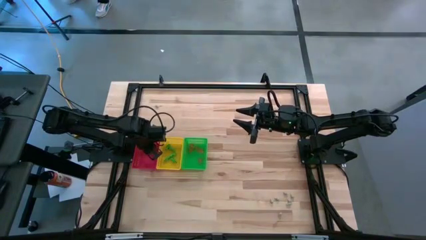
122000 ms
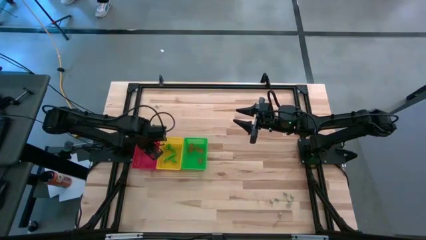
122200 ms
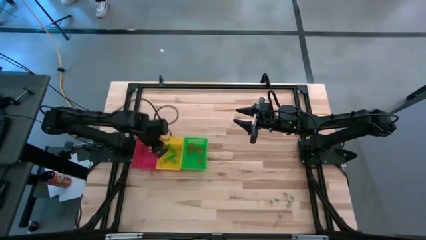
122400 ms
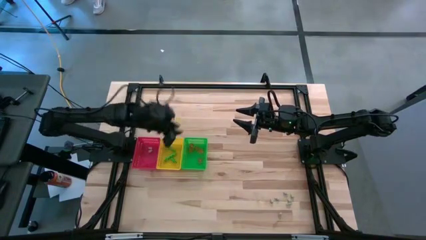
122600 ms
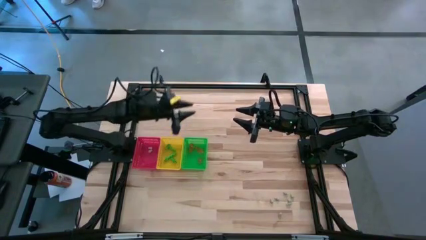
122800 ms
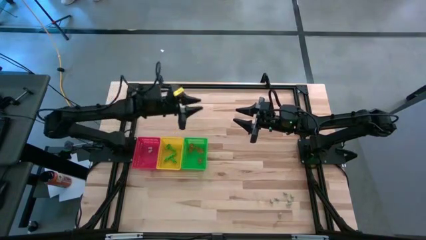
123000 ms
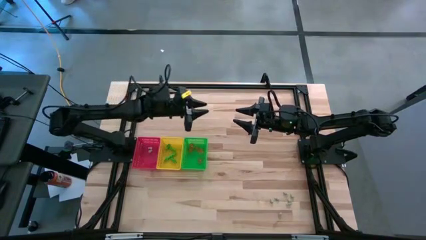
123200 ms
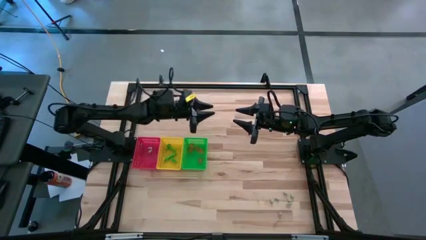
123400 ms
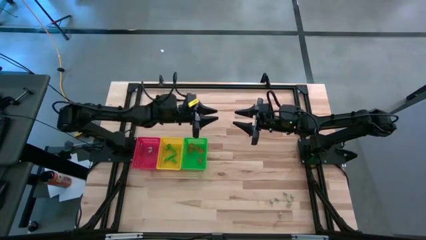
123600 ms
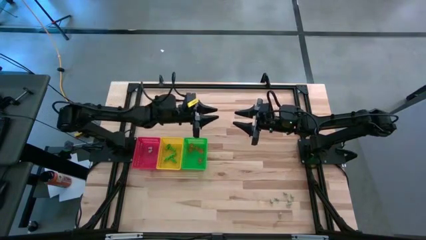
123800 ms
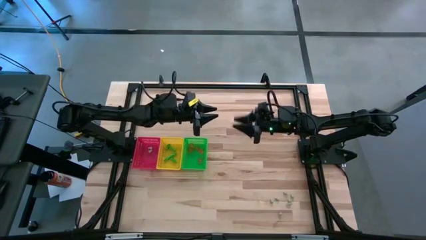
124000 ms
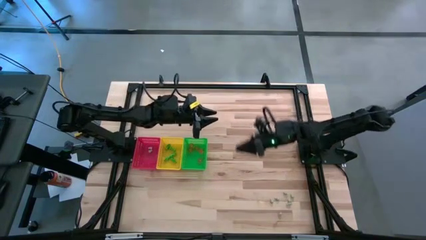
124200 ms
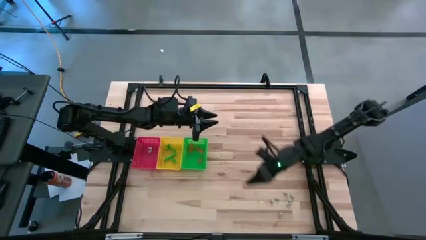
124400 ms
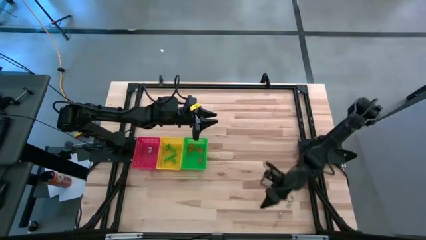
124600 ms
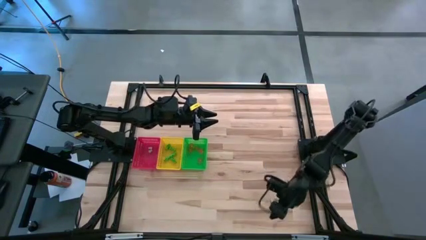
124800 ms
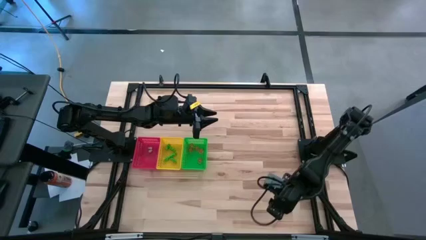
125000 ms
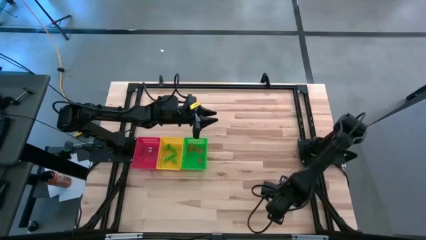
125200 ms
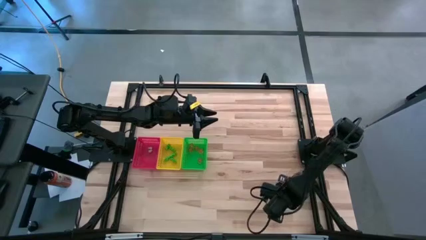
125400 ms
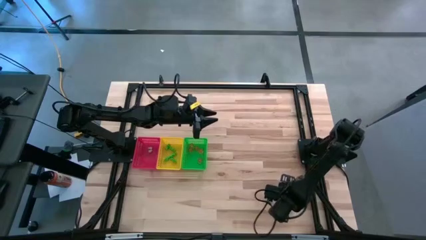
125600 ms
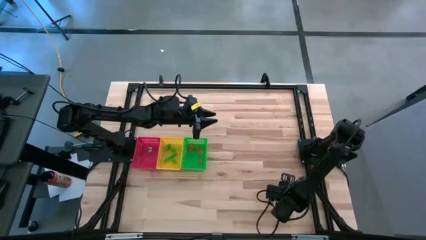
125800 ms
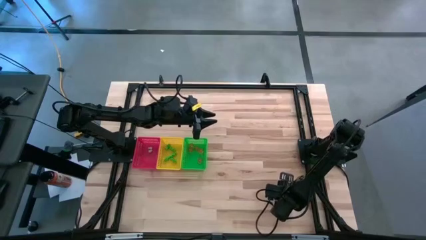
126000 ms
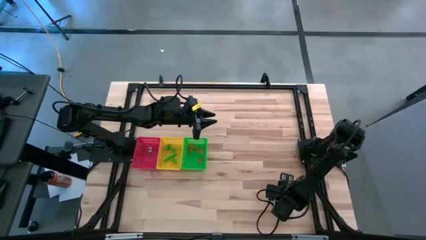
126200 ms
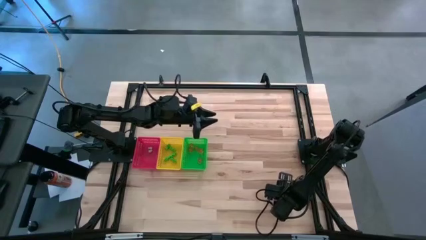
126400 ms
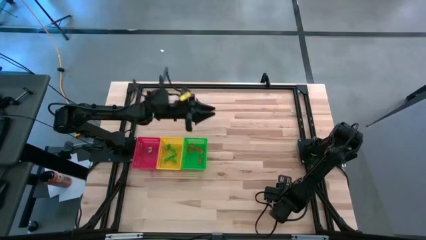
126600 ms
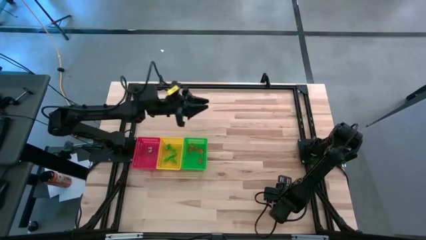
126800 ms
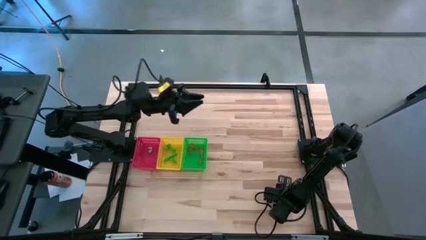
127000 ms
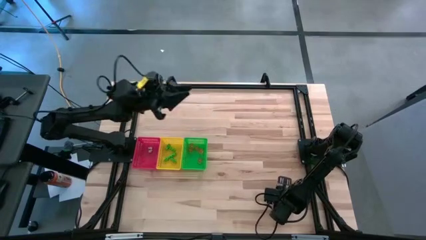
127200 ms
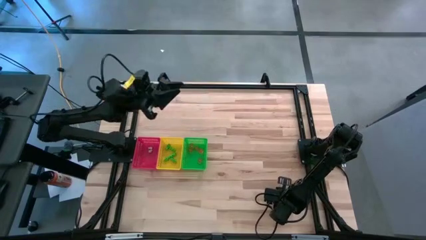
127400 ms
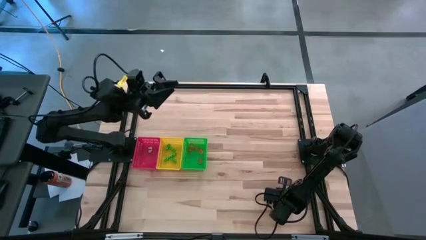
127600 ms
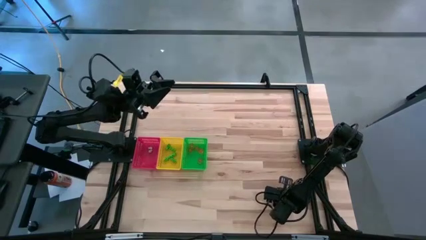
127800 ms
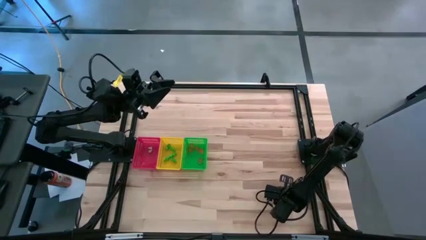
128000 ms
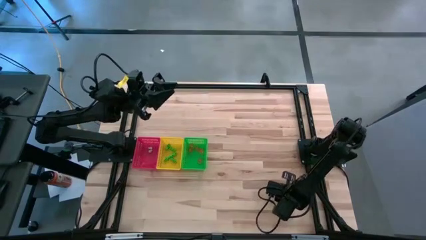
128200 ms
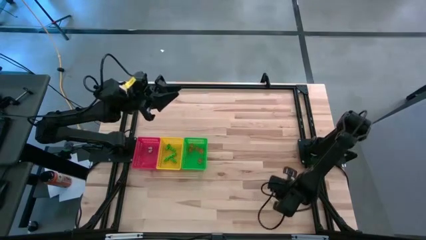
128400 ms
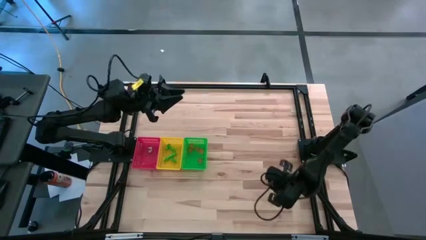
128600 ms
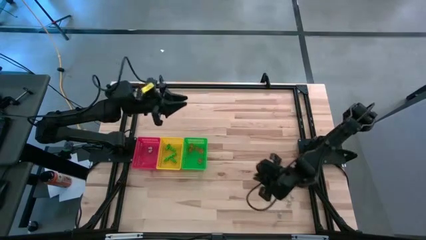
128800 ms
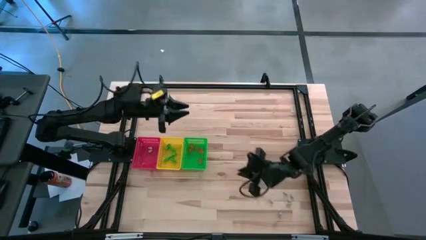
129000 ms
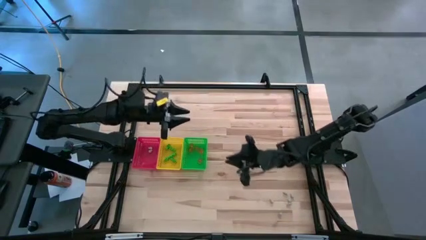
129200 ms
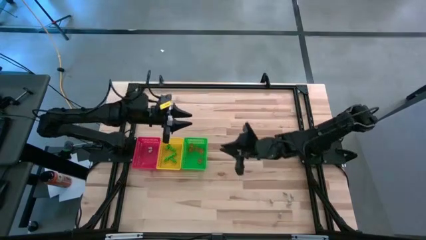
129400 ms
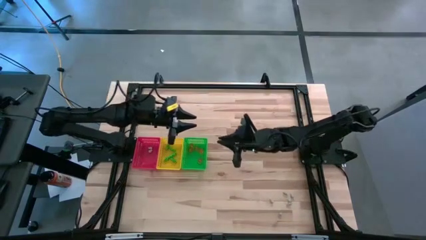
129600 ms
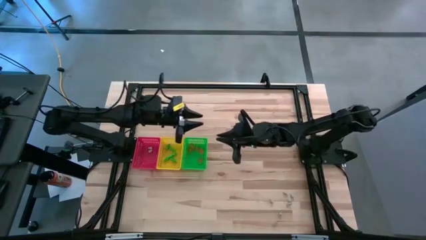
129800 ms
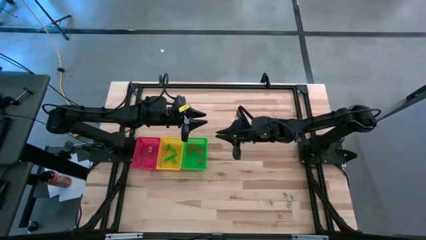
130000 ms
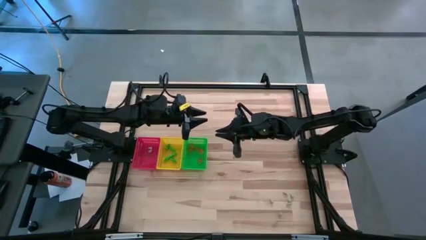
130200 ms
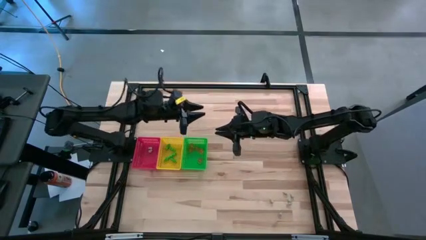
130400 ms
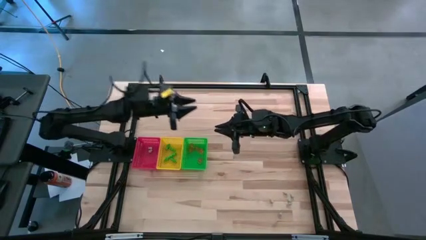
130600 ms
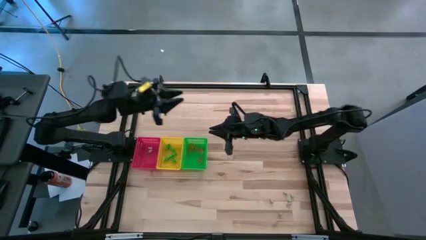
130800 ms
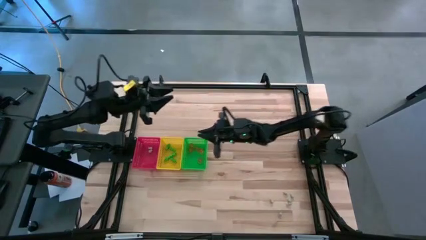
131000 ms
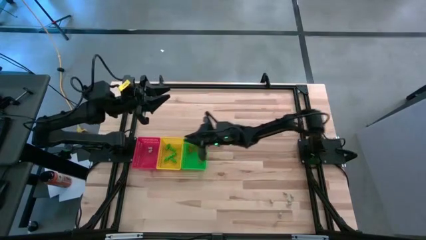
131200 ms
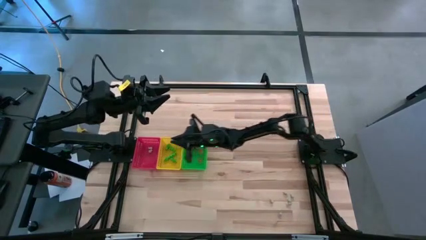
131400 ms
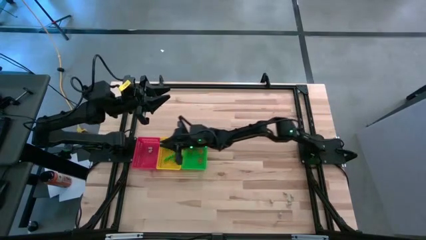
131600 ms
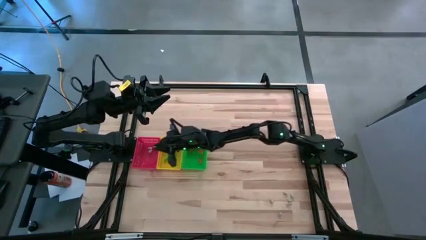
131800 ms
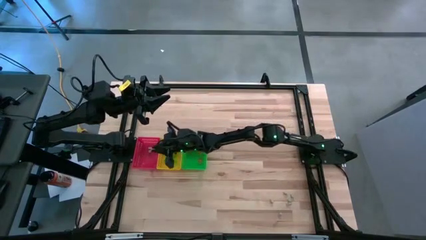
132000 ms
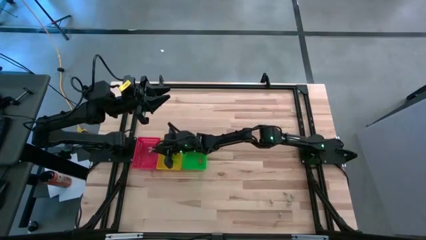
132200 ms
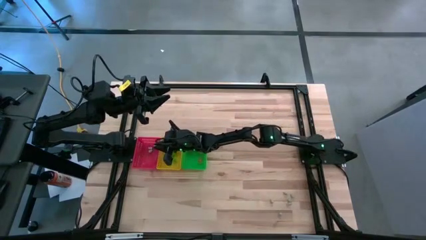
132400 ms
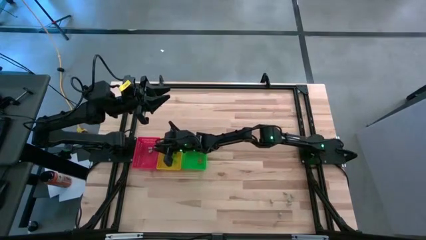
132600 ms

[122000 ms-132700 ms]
Task: Sort Halloween decoration
Put the white skull toy into the red bin

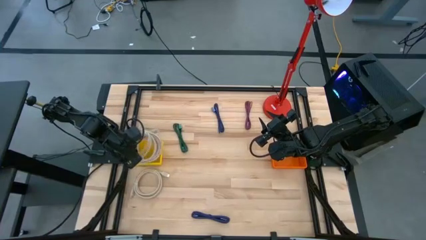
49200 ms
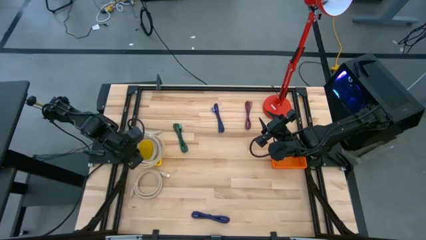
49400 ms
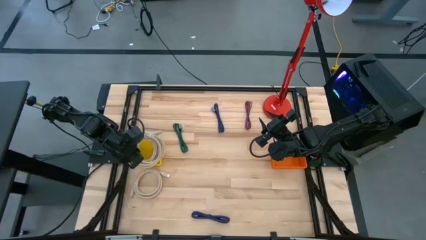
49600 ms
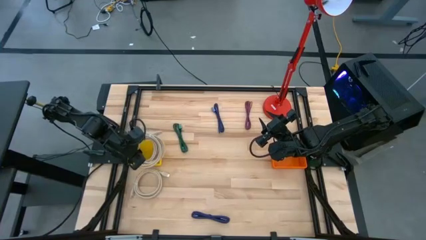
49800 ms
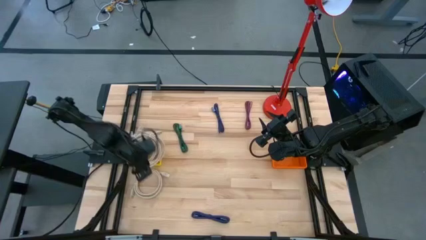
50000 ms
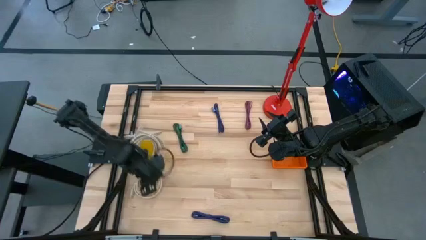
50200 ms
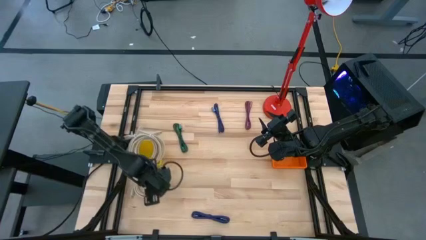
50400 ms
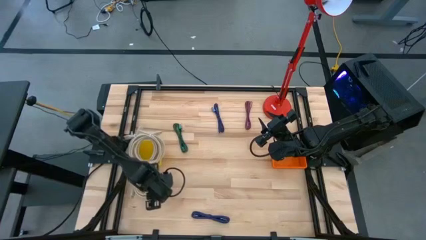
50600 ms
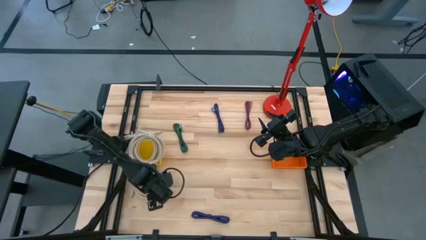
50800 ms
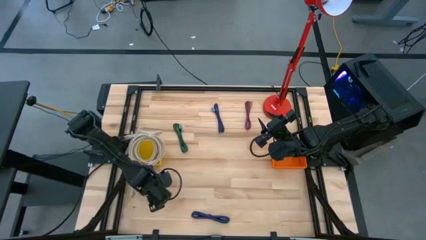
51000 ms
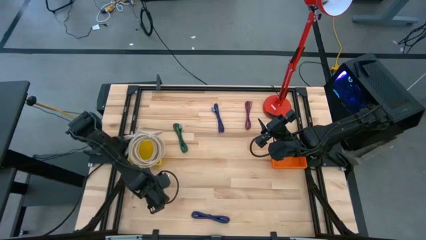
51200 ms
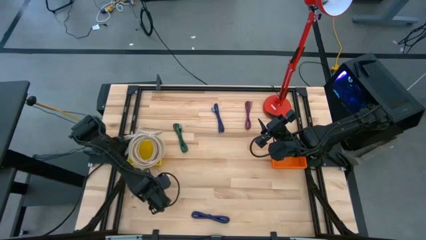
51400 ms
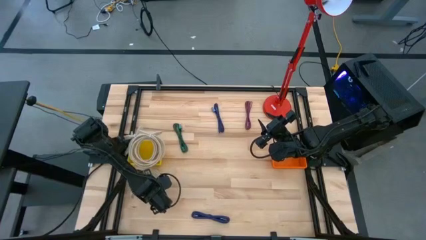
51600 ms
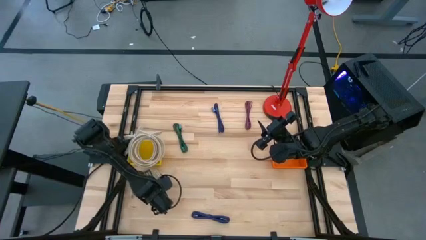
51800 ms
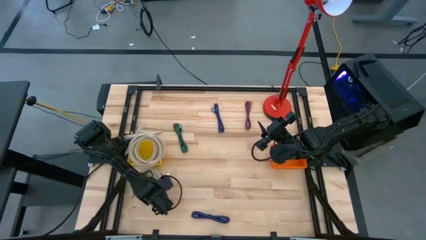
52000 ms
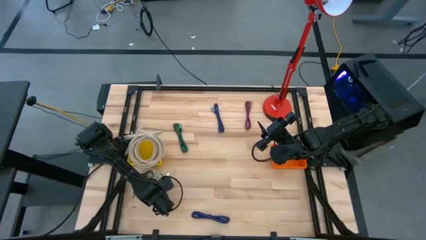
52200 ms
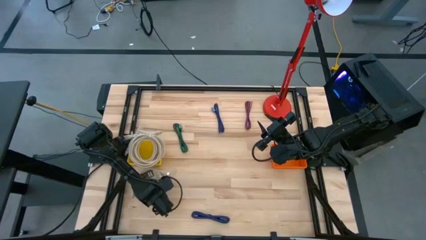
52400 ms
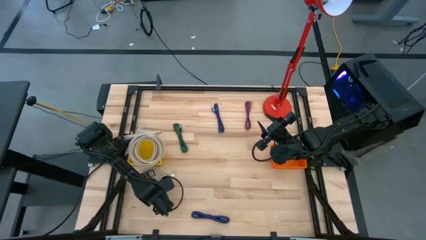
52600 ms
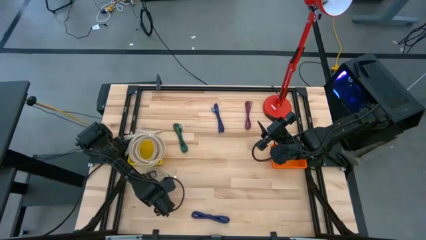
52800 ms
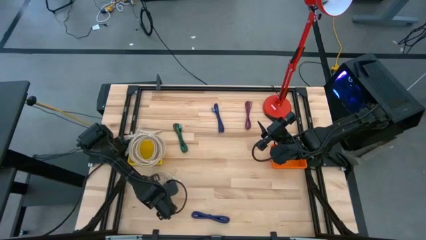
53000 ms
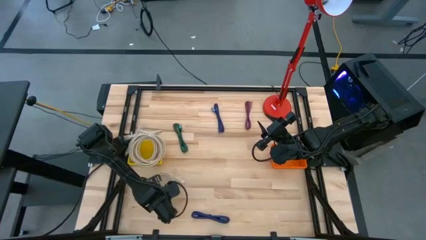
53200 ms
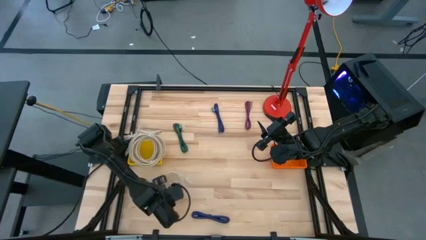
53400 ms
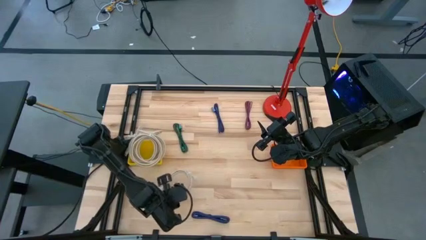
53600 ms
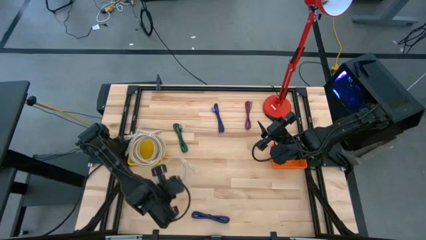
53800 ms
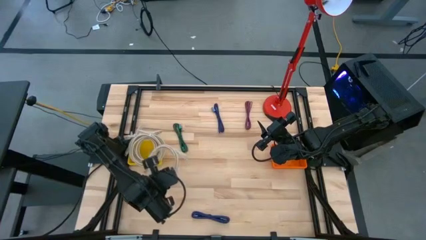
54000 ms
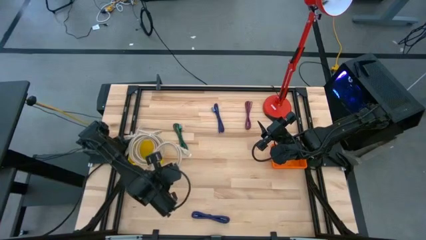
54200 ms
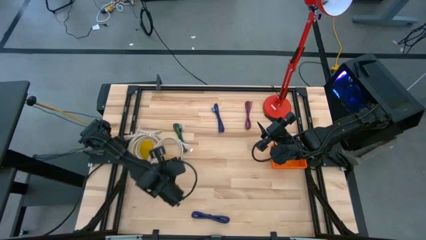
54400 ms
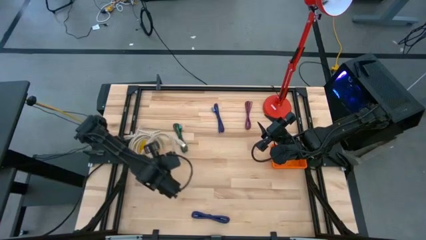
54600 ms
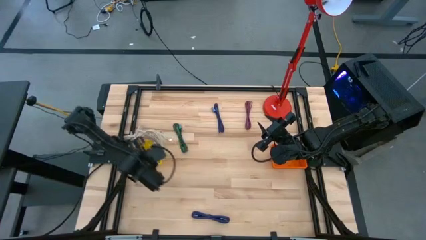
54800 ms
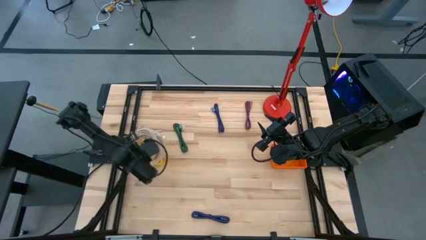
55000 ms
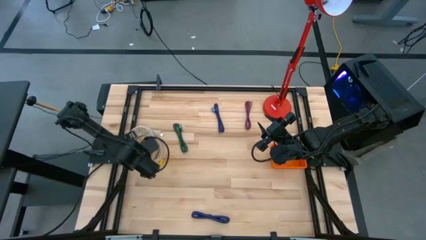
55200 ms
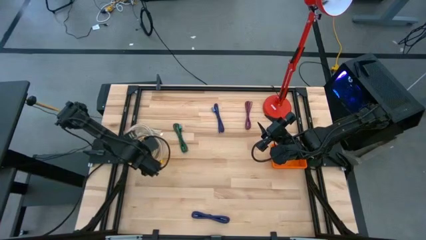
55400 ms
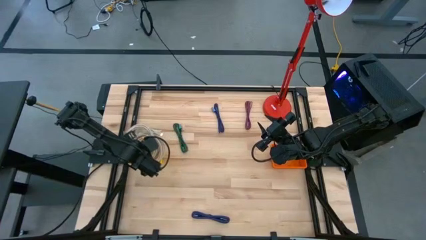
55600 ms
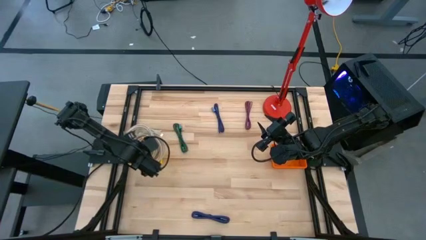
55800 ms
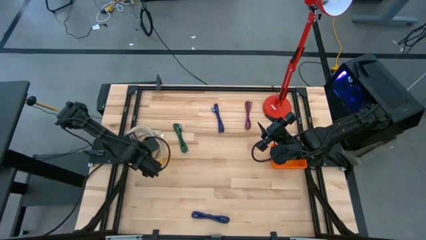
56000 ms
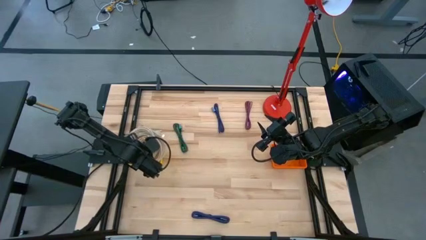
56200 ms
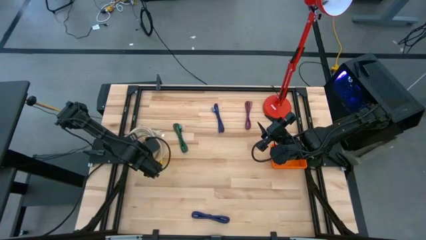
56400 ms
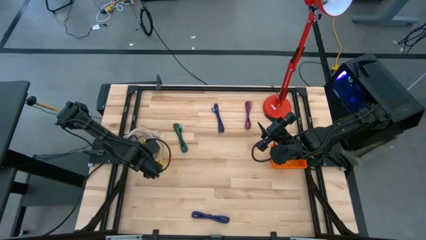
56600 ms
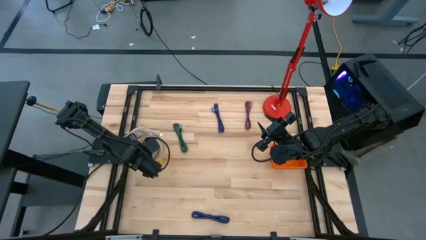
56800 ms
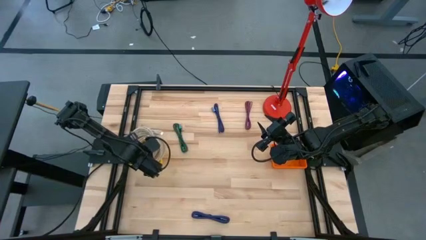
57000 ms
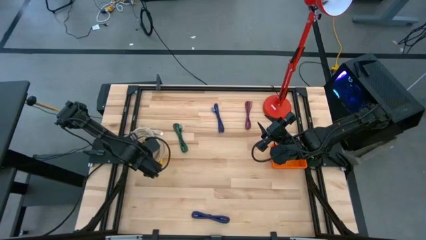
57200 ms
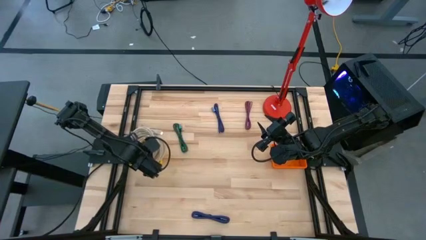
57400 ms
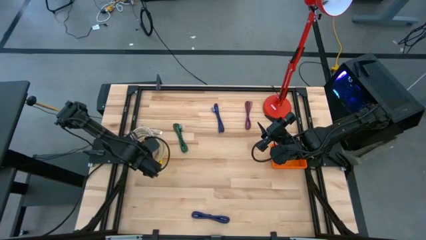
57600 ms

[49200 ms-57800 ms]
Task: Pick & Place USB Port
Put the brown HDMI cable into the yellow basket
